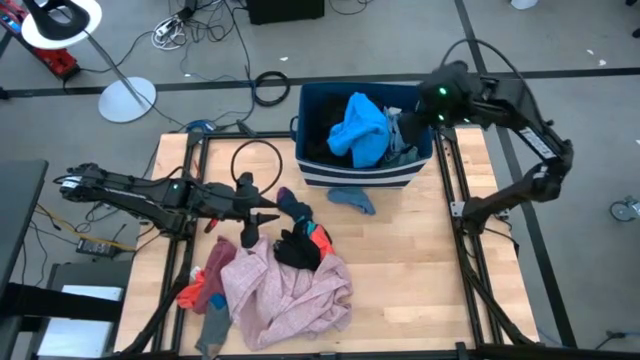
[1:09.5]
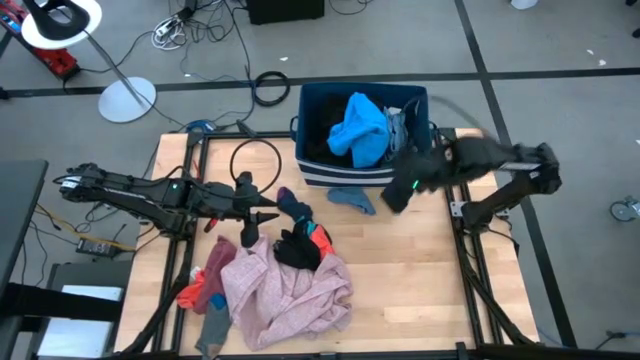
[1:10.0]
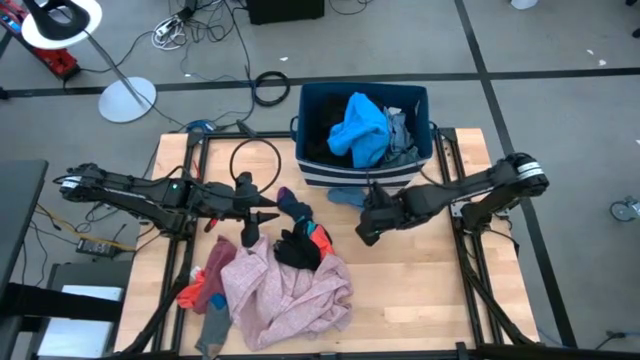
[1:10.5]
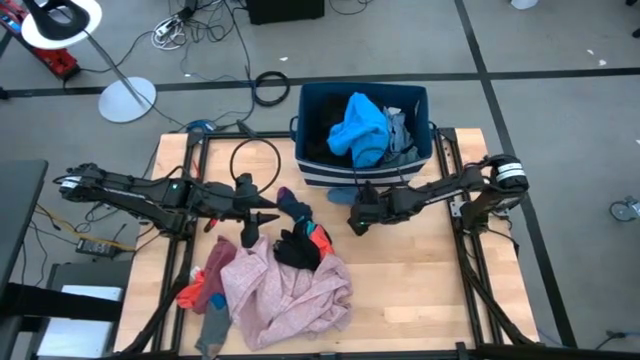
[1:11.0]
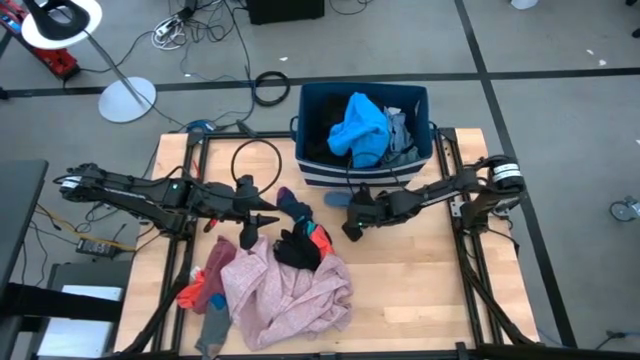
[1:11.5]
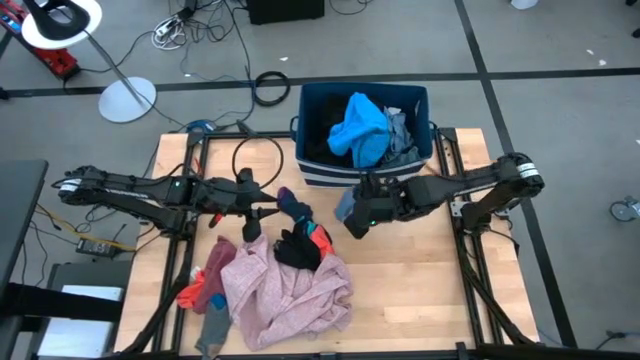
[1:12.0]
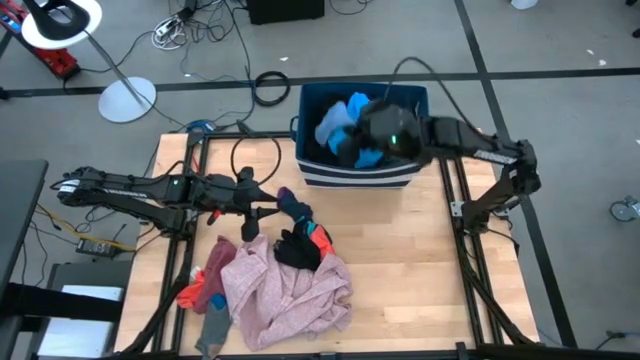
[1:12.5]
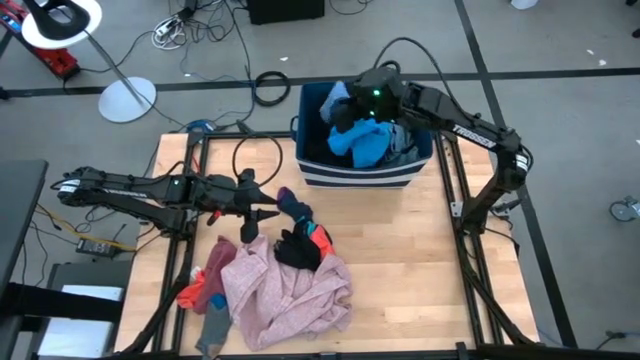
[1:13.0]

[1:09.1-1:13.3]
Task: Sort clothes
Put the blue socks into the blue bin

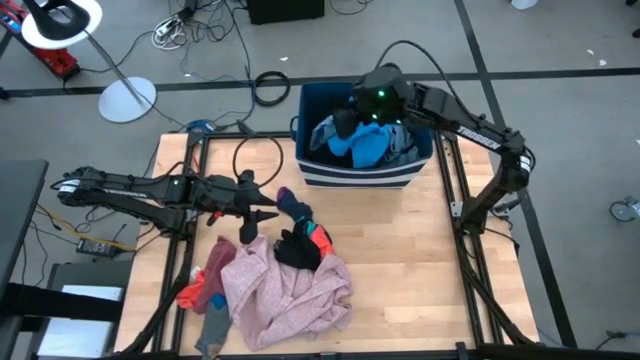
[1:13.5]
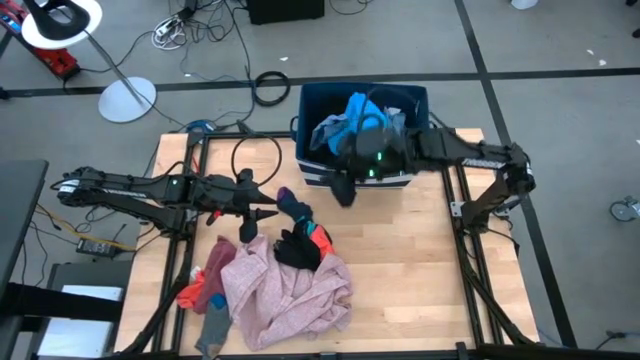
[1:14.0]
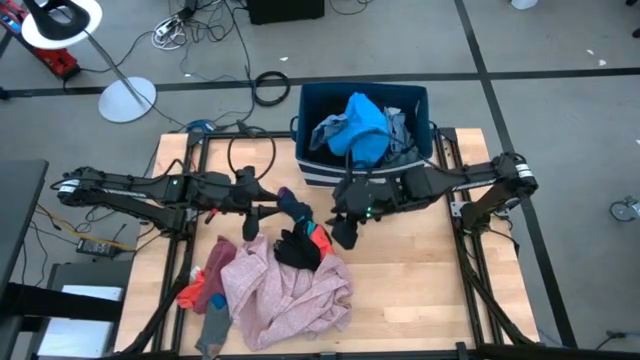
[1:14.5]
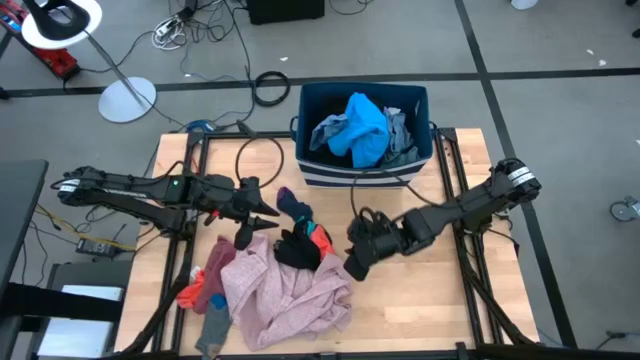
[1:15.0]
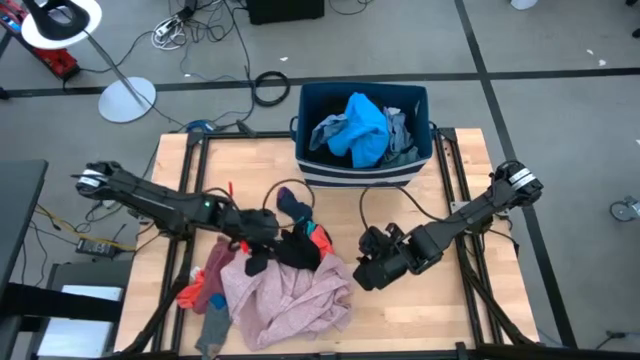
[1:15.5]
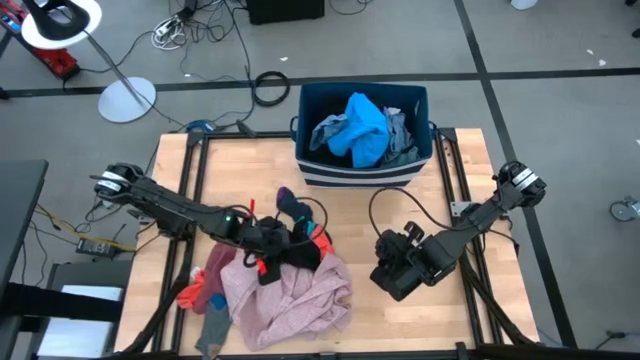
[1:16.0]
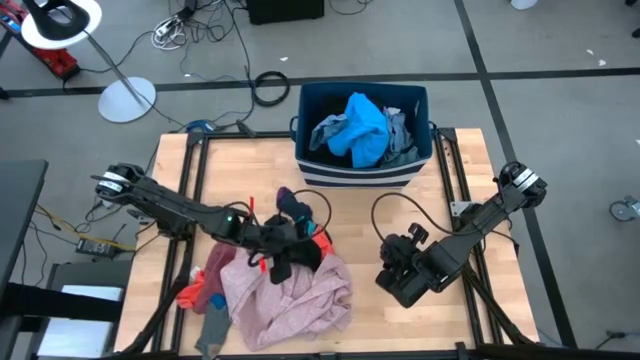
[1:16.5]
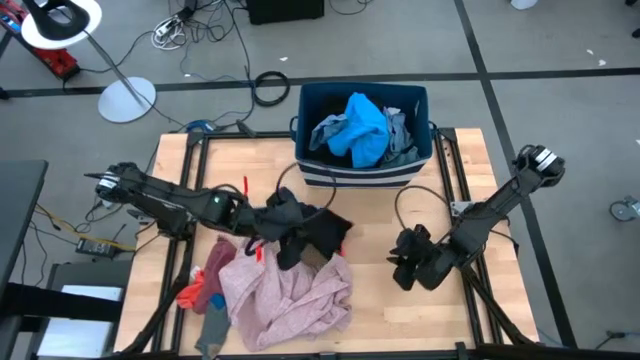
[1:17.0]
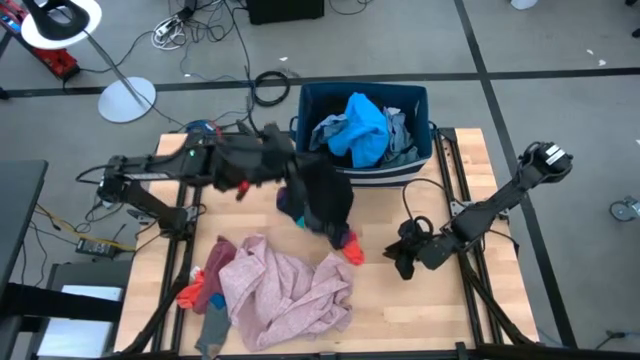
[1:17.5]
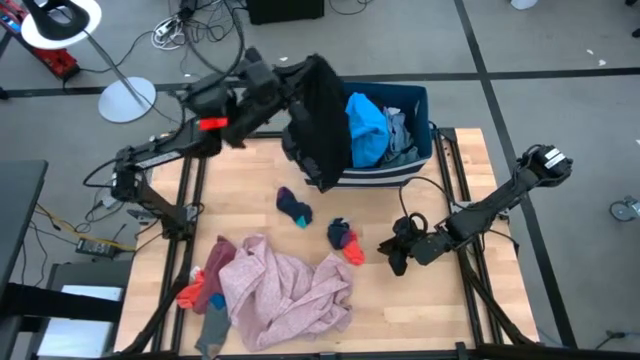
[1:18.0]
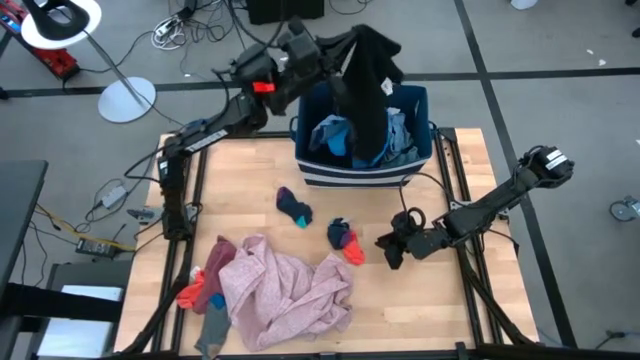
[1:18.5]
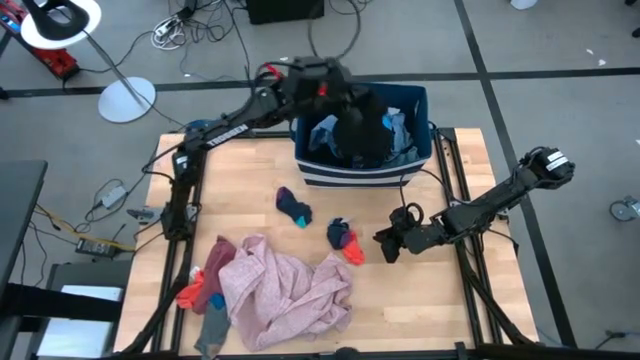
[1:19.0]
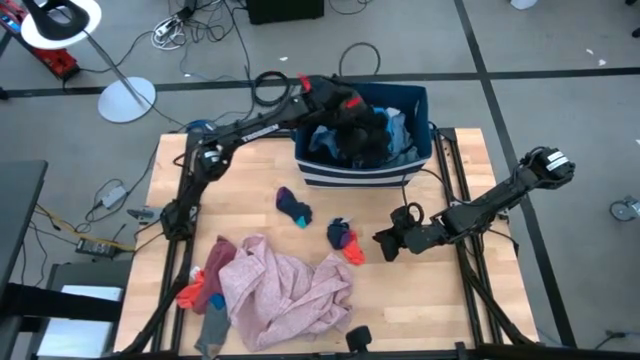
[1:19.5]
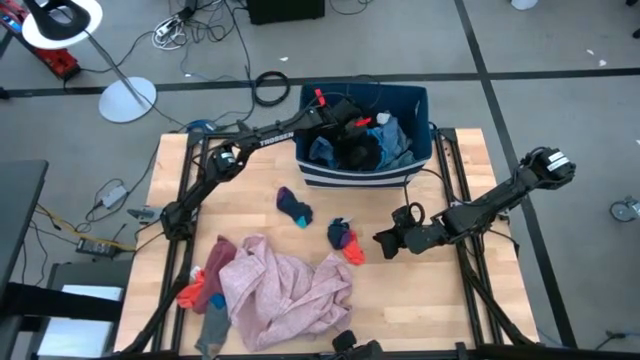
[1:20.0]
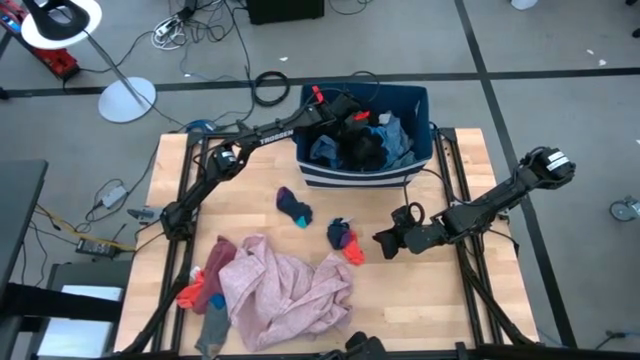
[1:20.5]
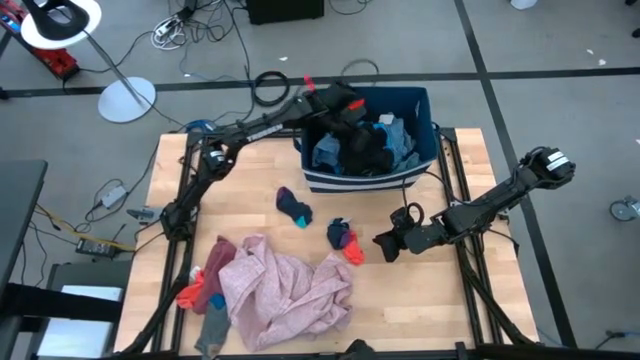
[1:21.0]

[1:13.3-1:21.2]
Put the black boxer into the blue bin

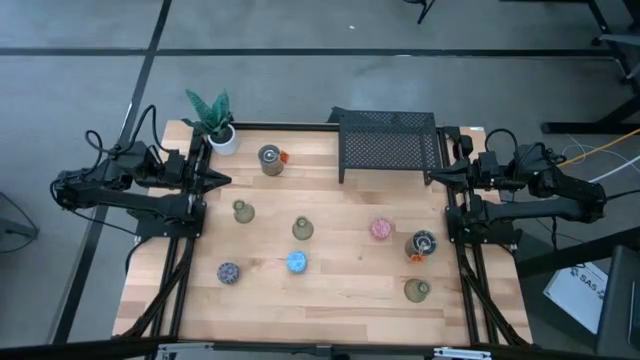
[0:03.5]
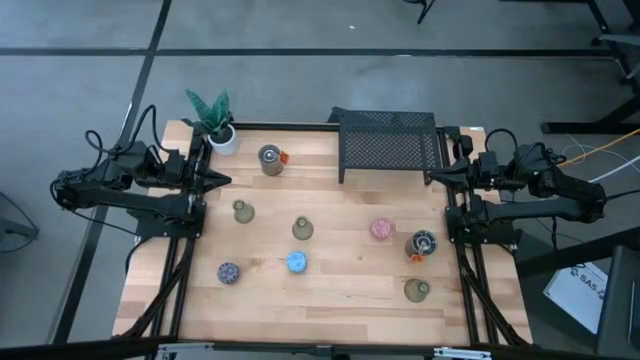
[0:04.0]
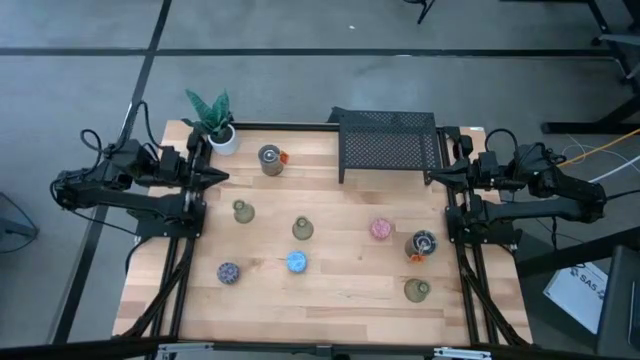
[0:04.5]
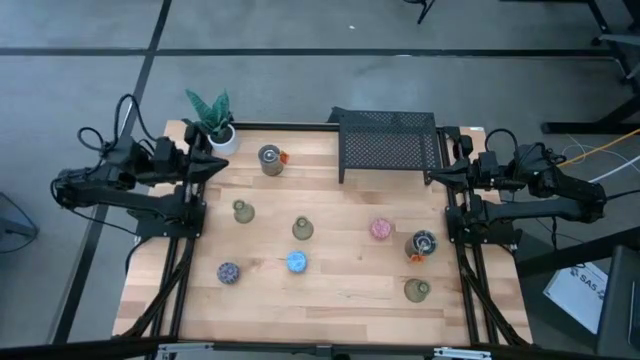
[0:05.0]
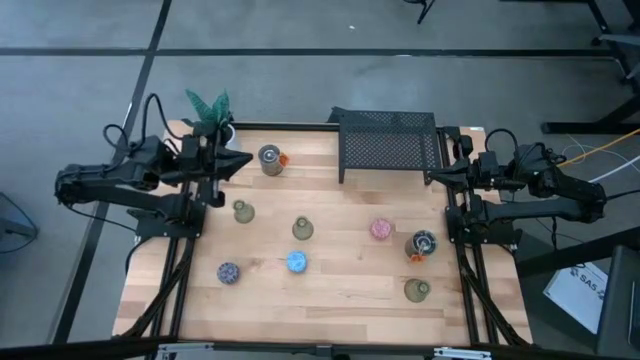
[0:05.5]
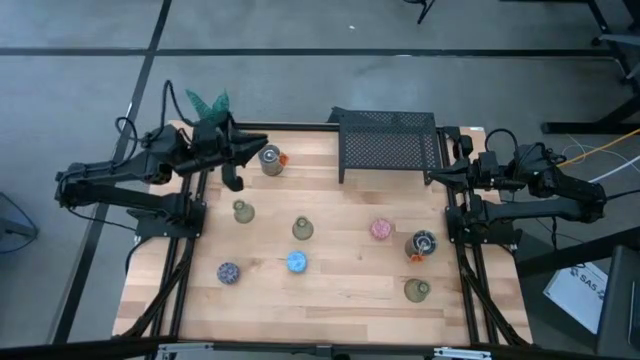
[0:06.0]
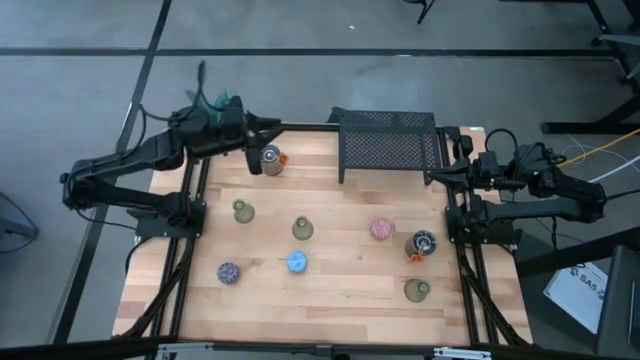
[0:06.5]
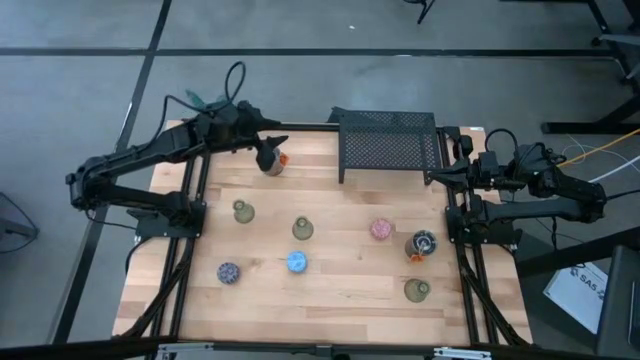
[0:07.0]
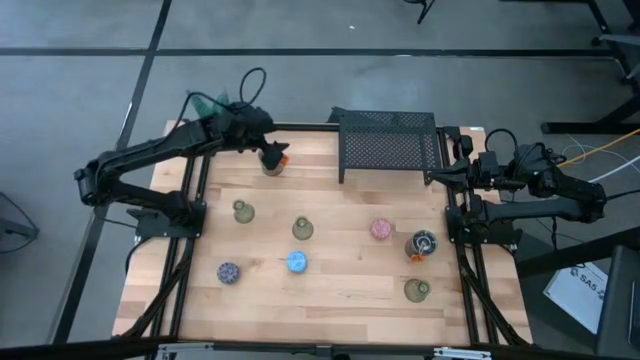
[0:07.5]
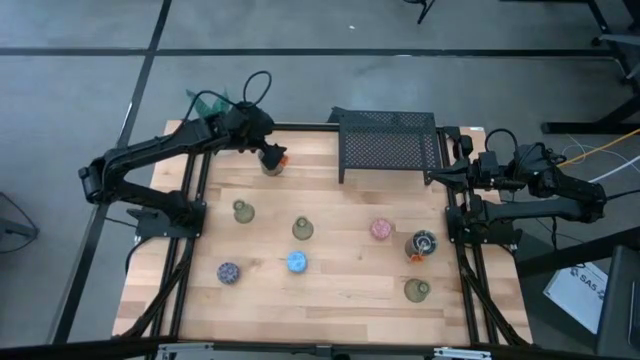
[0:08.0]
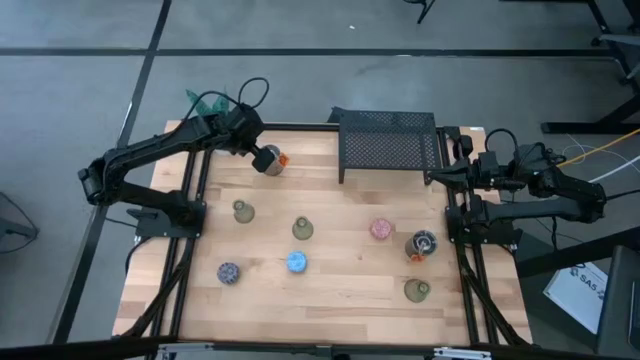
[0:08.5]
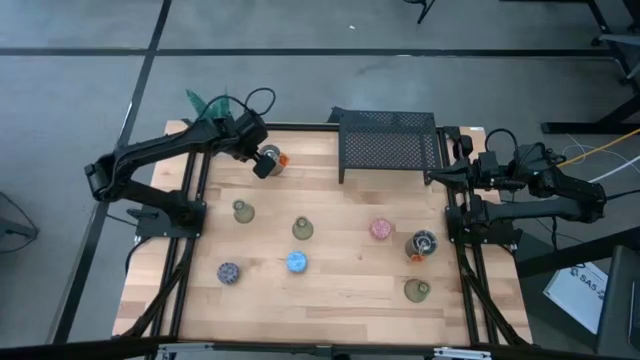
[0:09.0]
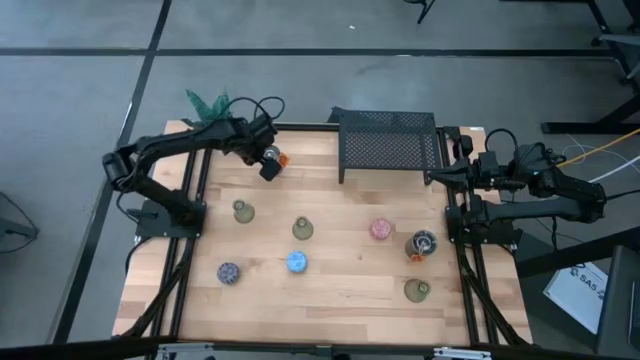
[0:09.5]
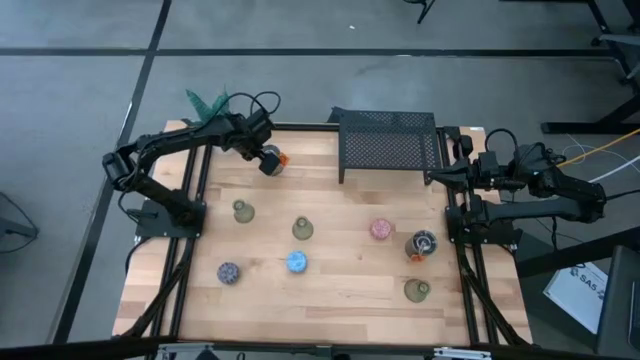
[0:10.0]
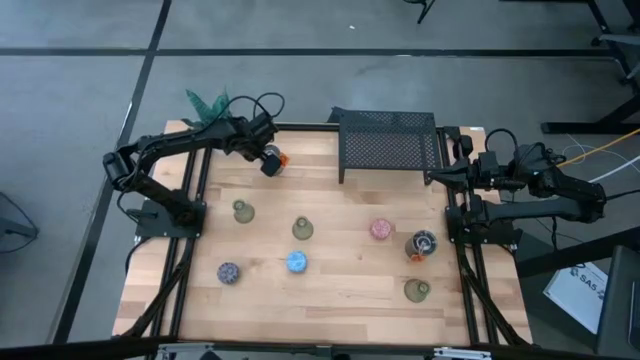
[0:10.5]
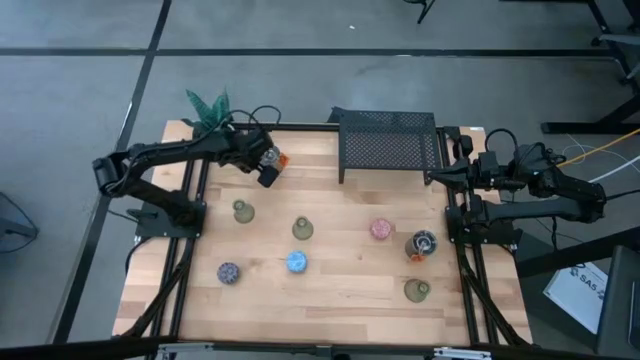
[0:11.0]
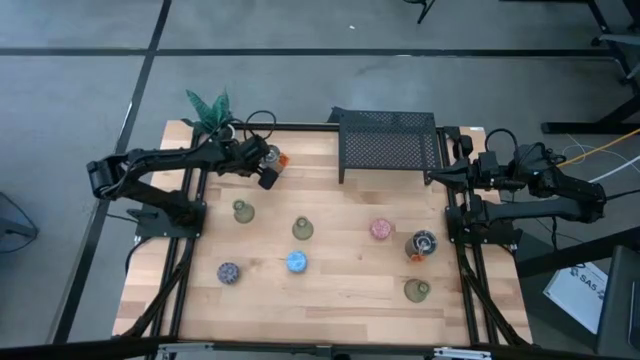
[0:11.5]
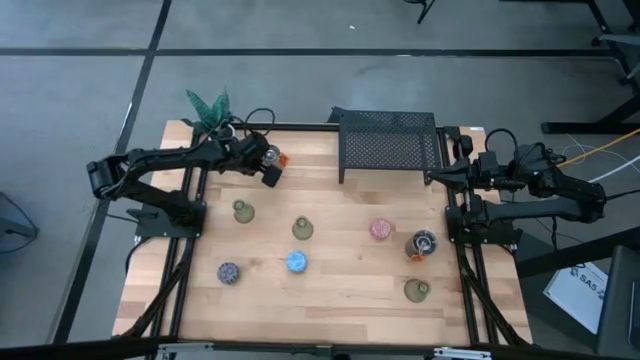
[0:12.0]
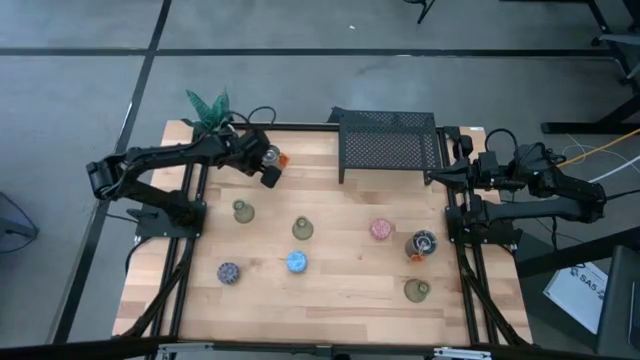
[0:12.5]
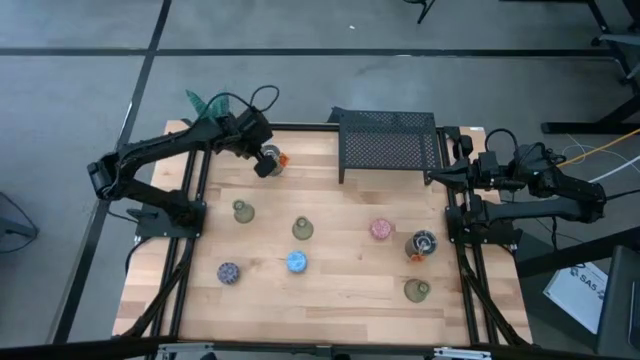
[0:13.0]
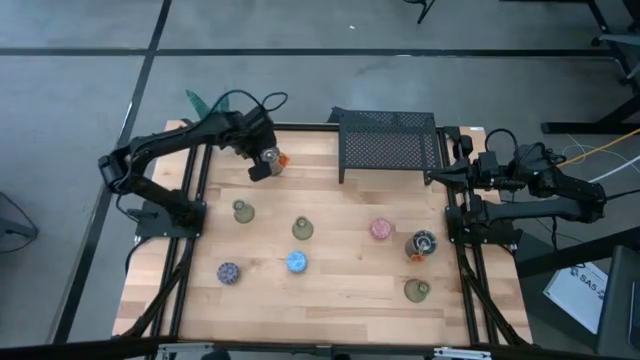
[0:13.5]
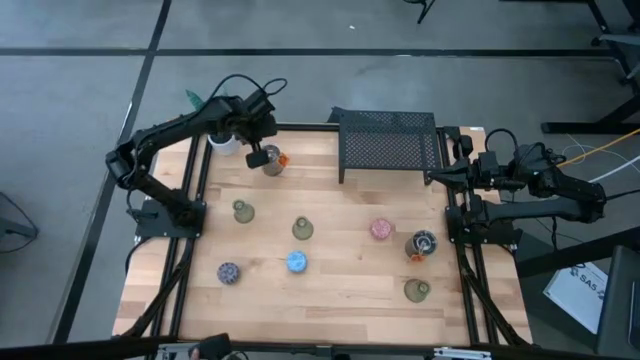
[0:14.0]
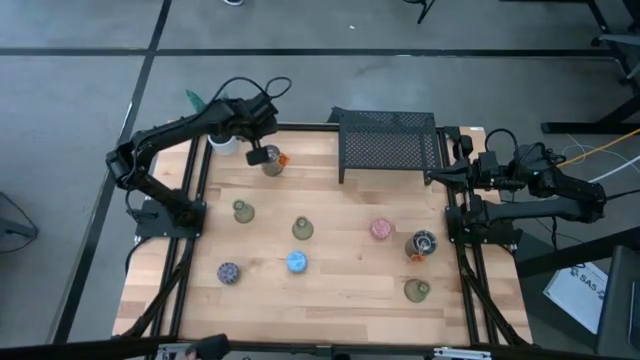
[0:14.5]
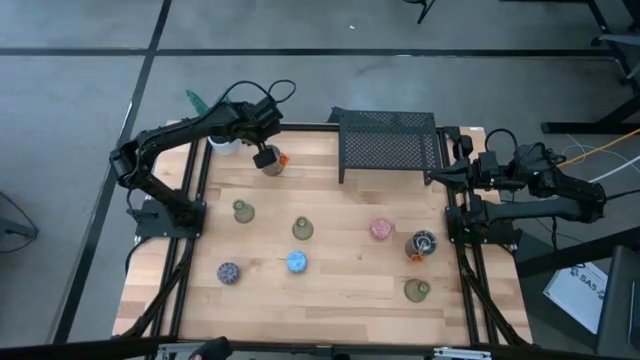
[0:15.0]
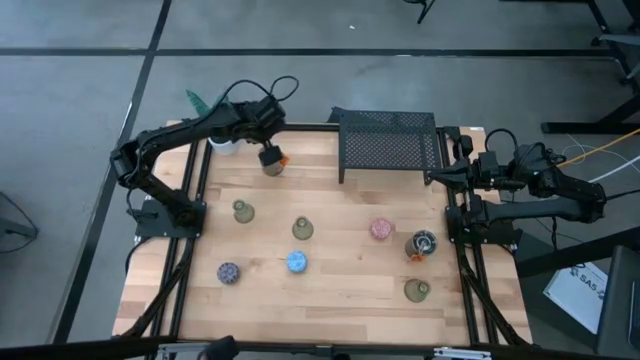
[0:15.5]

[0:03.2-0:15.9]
Task: Pick & Place candle stick holders
Put the top silver scented candle on the shelf
